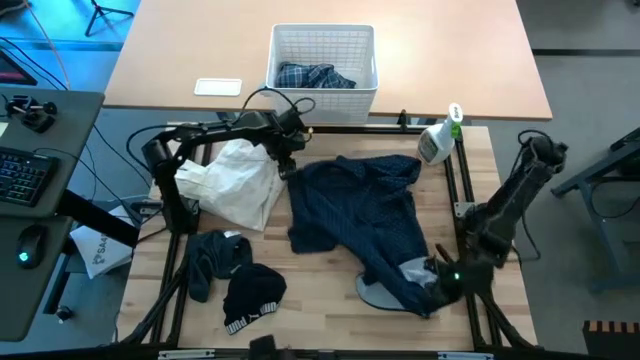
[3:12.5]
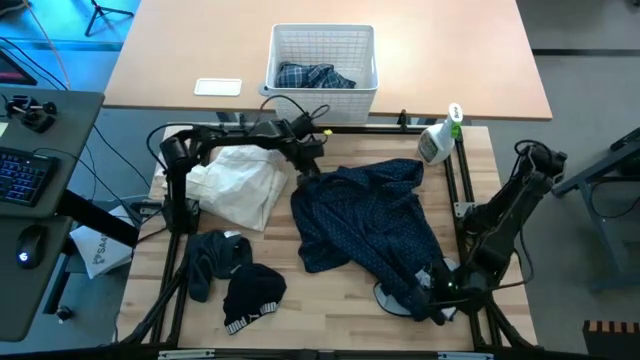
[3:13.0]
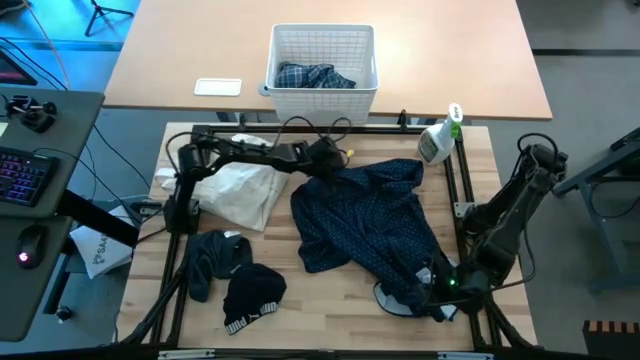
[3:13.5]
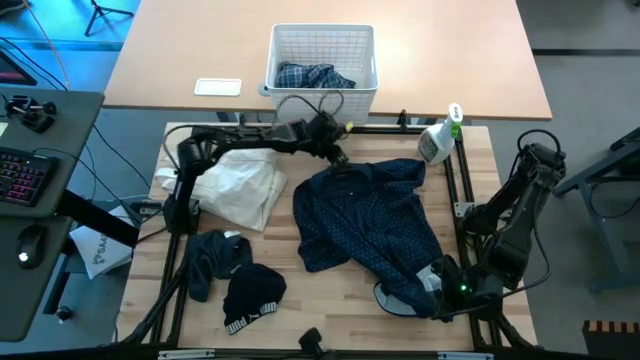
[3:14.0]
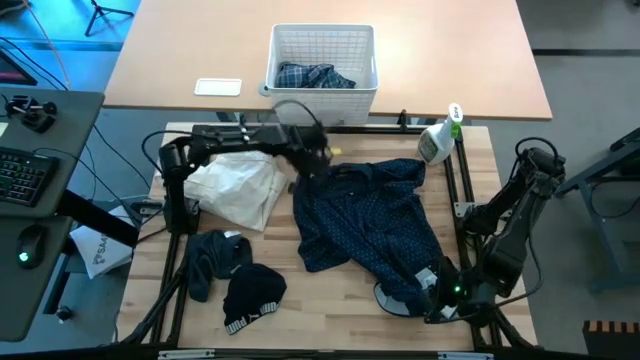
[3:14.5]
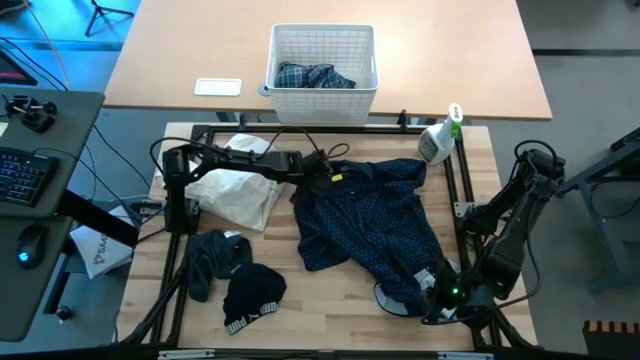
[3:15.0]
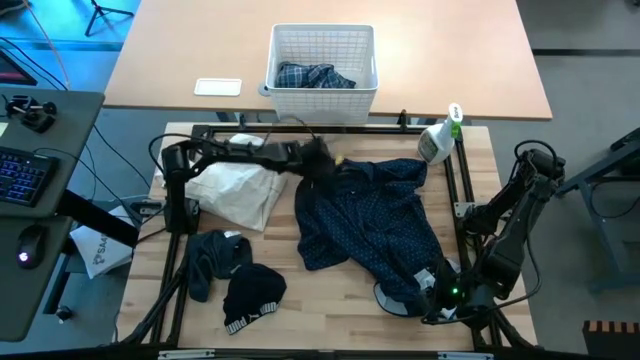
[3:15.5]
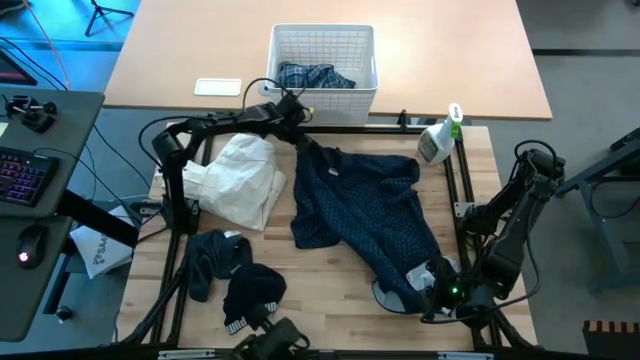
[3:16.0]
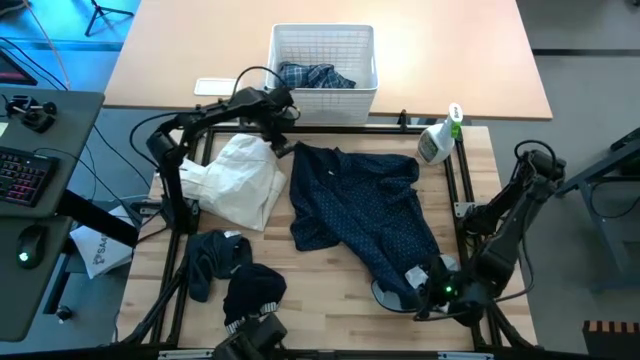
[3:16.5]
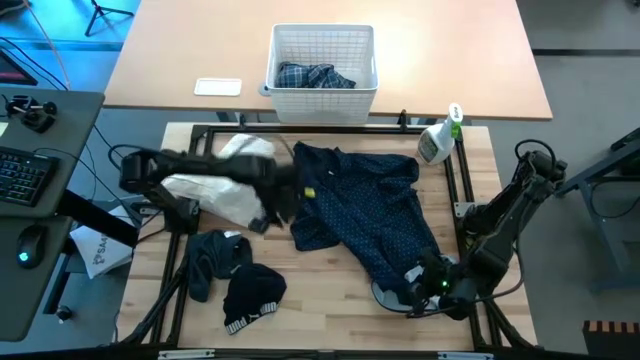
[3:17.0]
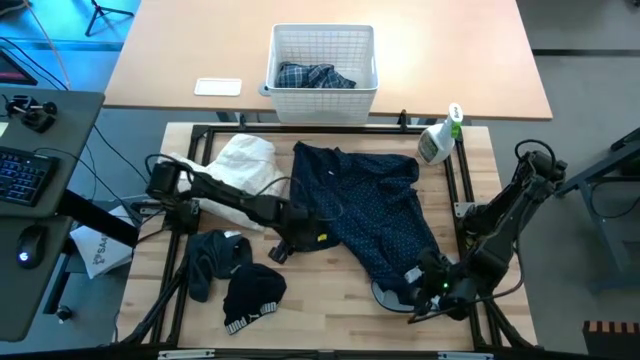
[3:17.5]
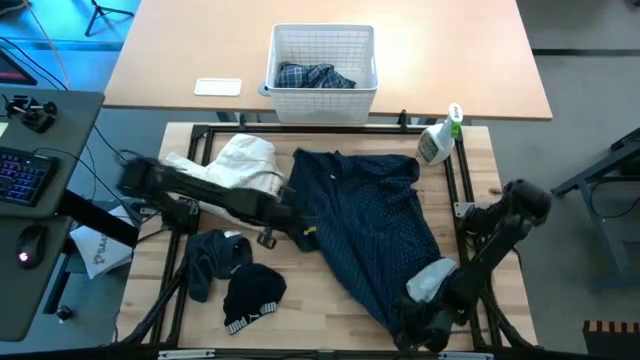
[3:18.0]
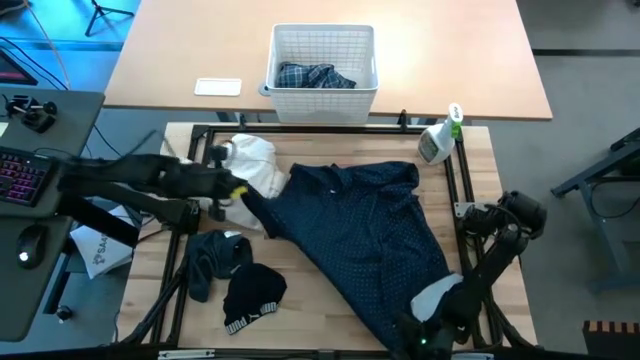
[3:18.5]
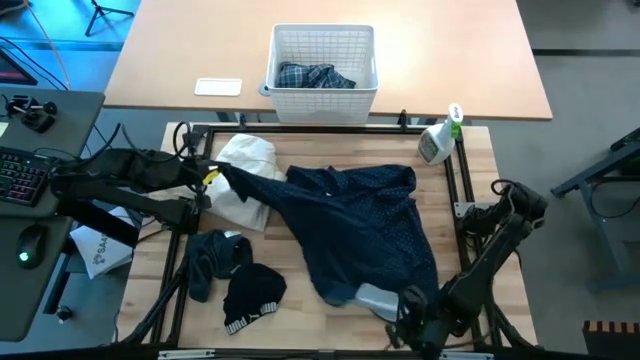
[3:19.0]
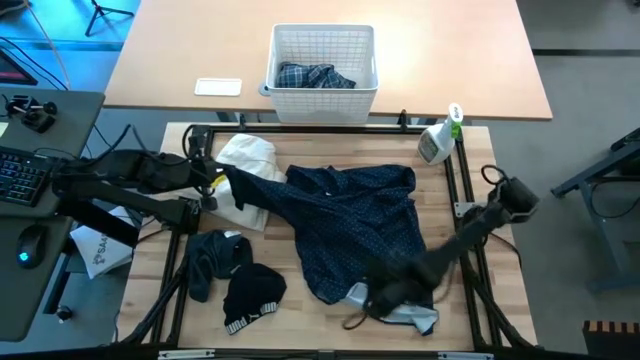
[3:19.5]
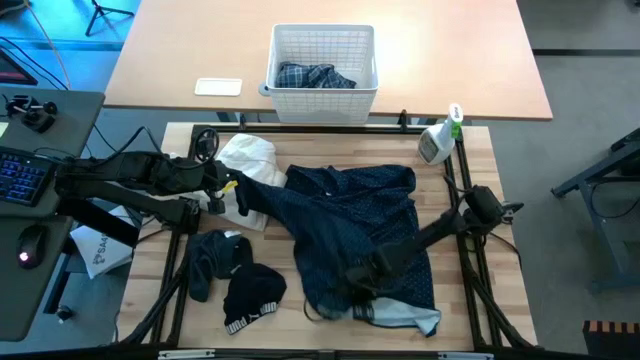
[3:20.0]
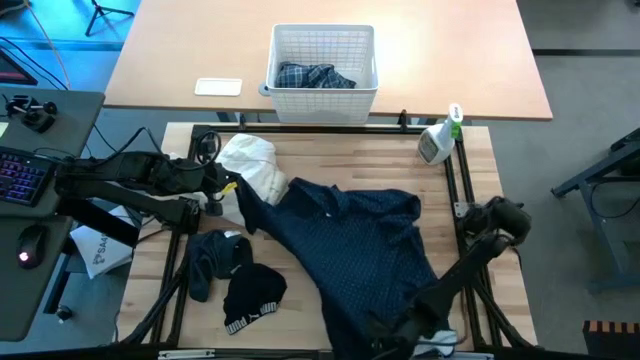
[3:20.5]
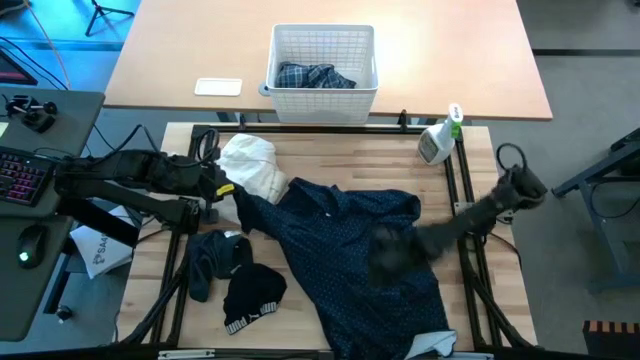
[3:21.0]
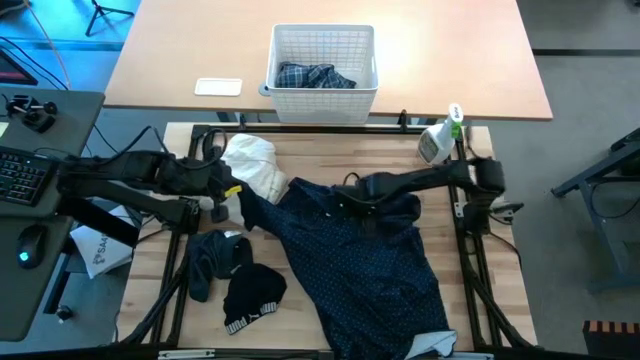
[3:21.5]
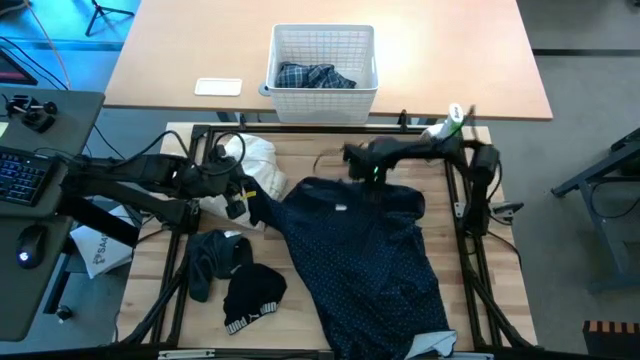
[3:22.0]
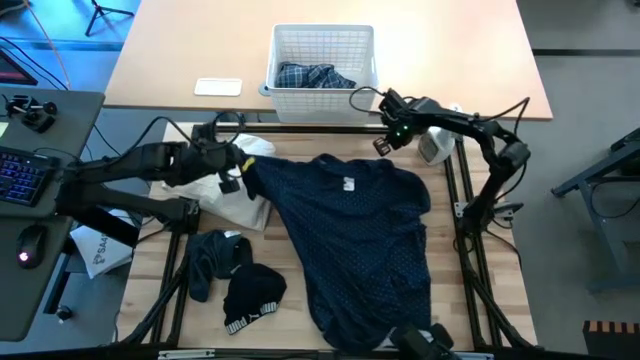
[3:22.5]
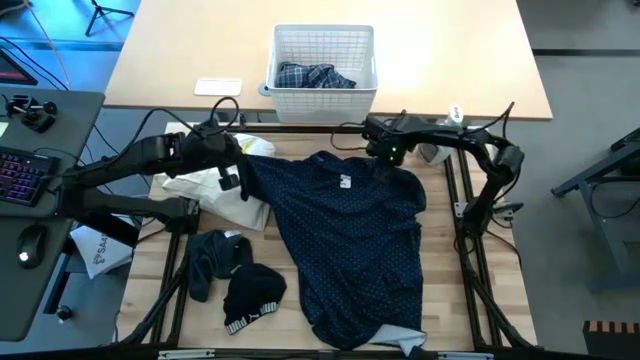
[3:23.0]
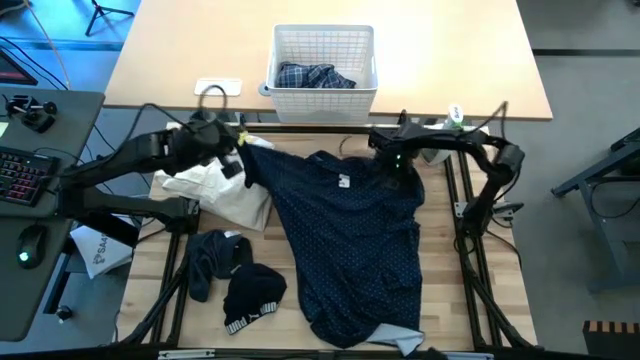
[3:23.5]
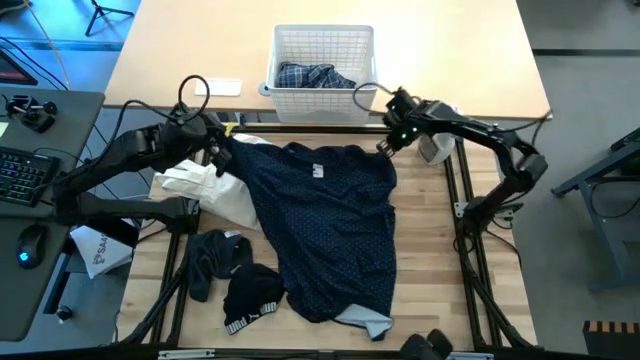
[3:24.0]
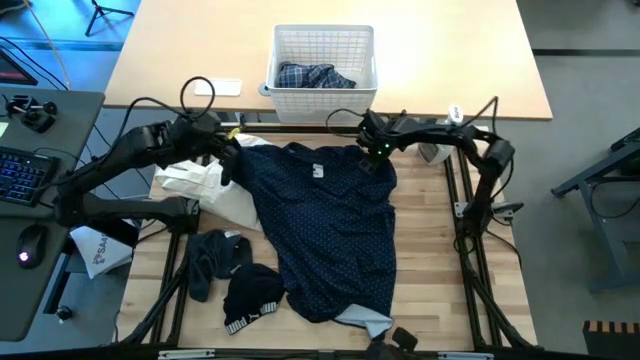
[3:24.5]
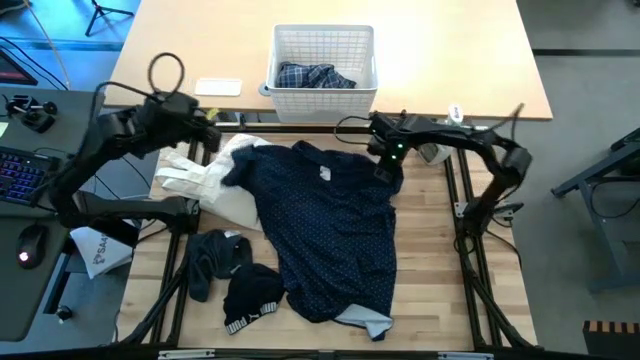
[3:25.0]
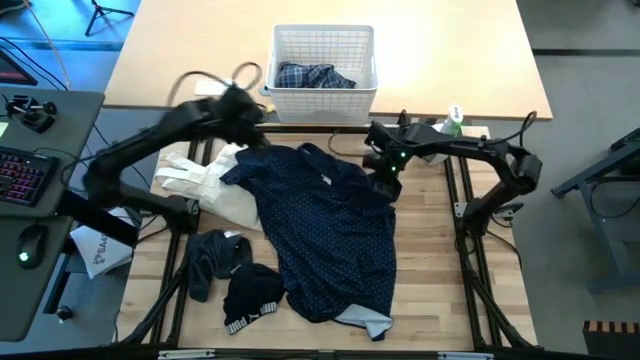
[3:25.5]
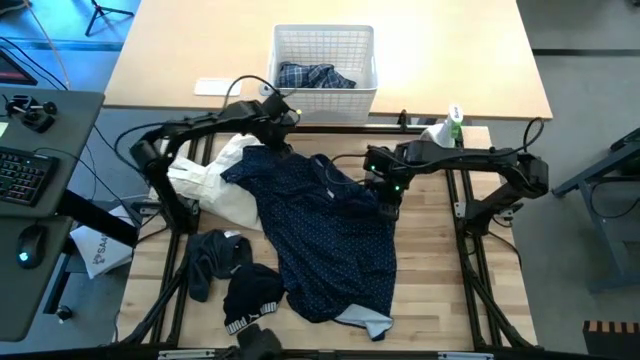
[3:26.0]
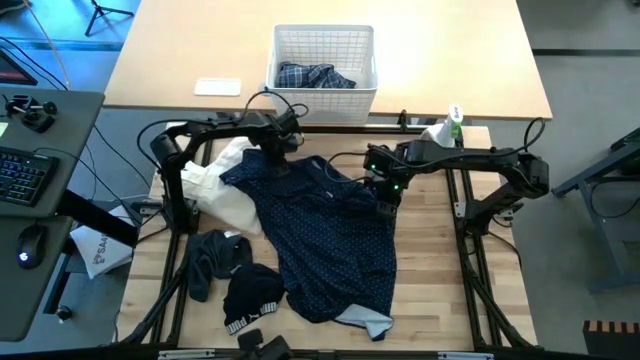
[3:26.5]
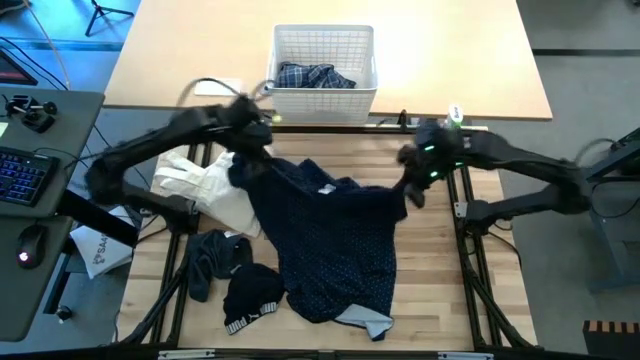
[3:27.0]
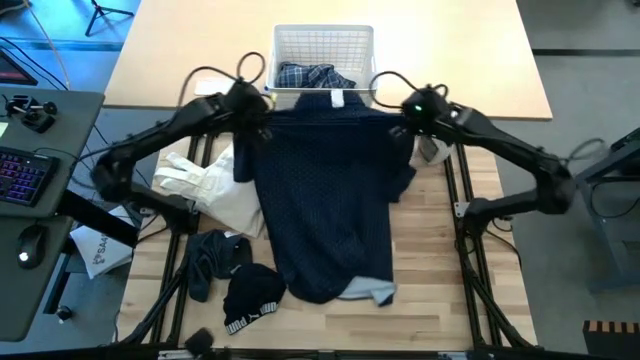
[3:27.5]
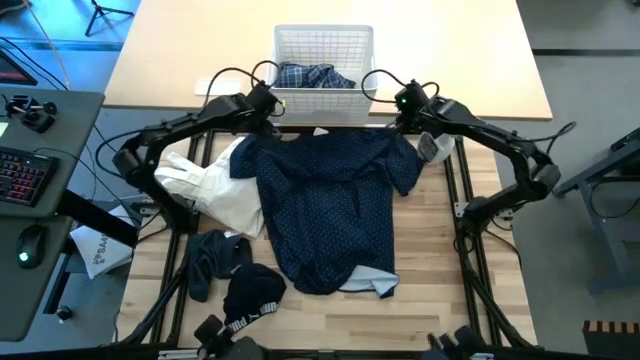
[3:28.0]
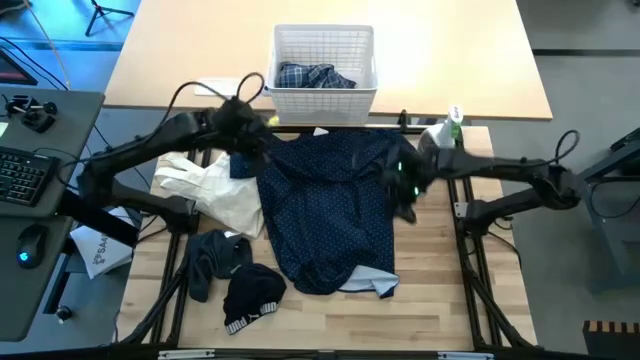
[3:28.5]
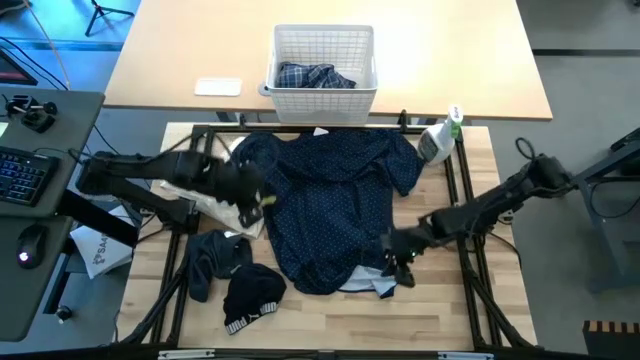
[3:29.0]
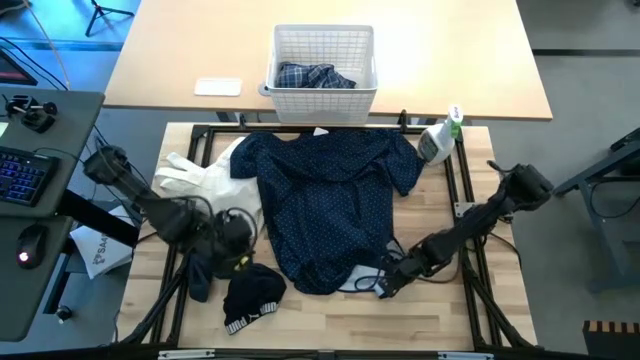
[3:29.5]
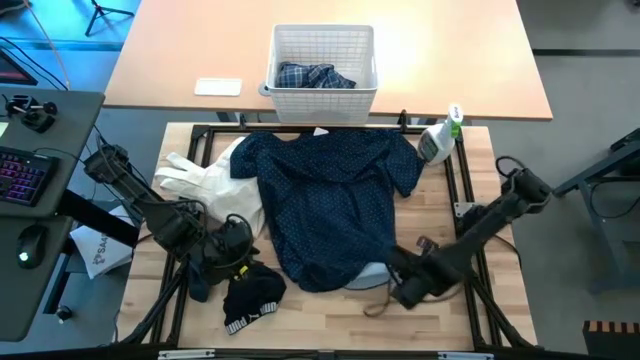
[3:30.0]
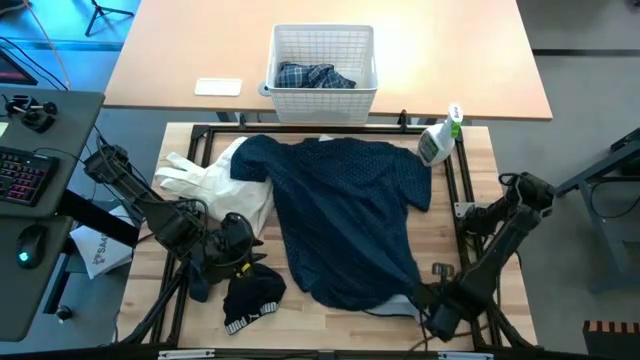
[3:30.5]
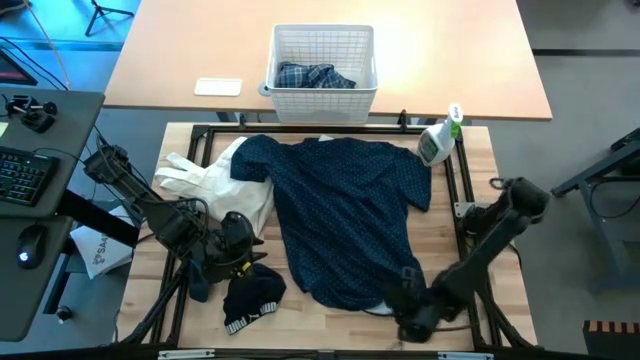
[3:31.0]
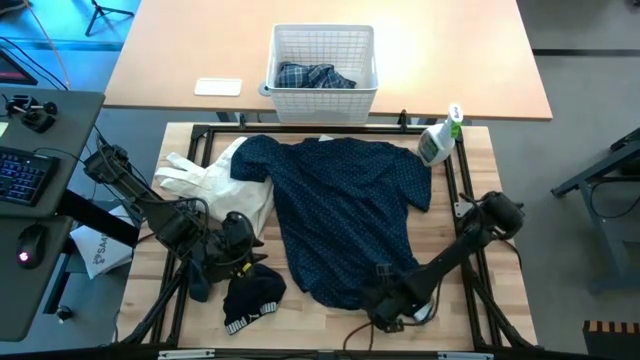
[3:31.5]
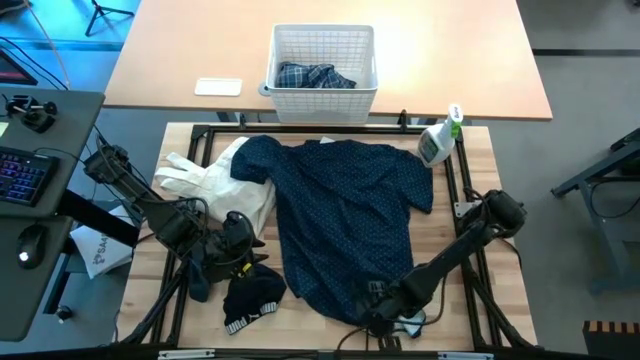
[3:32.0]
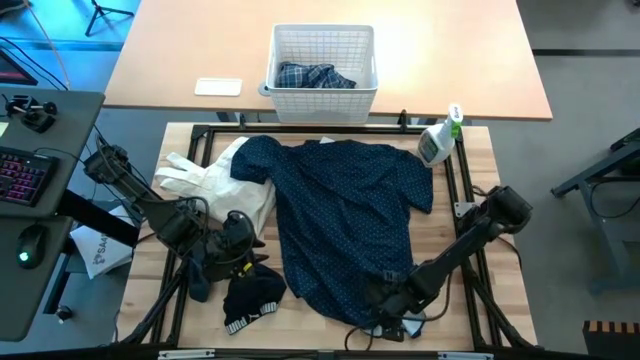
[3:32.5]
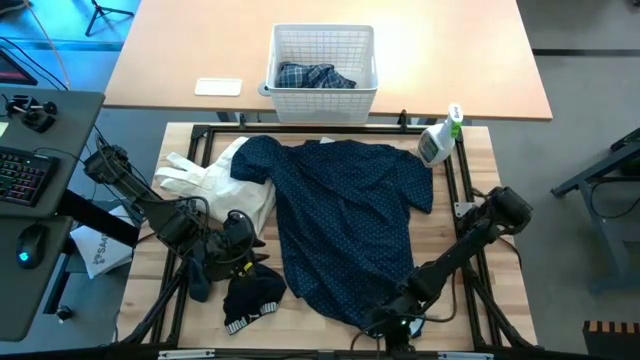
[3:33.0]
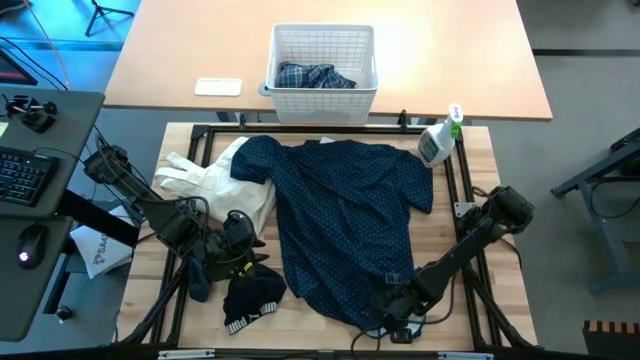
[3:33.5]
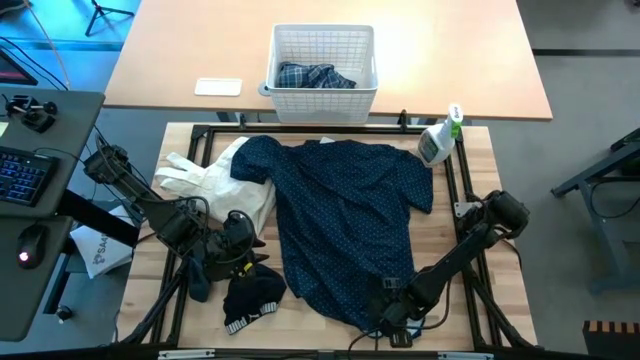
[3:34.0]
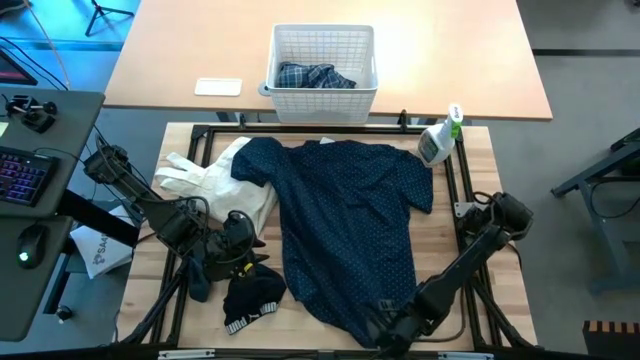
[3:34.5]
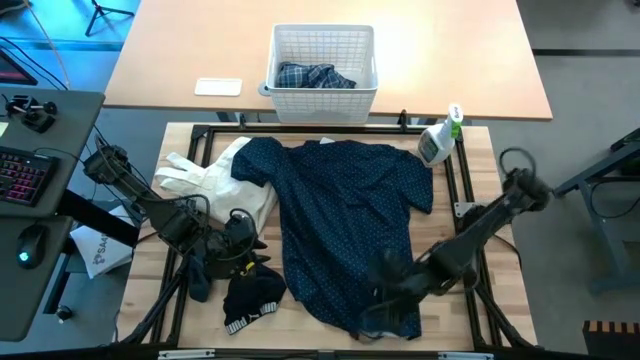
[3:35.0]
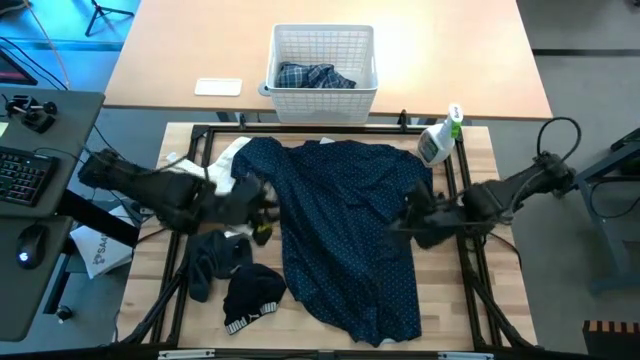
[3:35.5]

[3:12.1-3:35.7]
Task: Fold laundry
Fold the navy blue polo shirt
